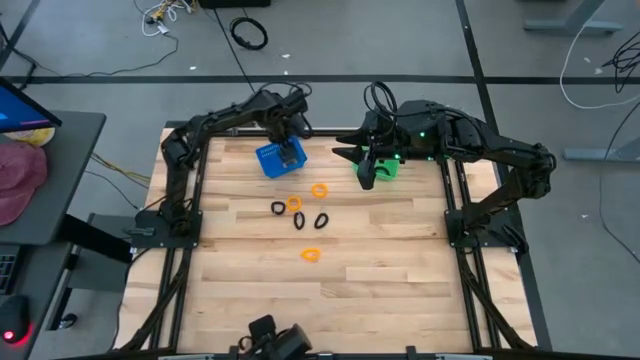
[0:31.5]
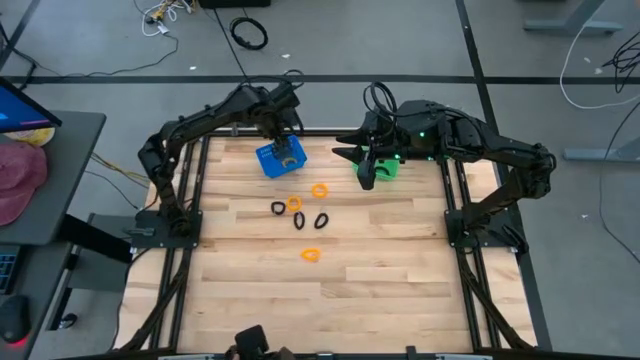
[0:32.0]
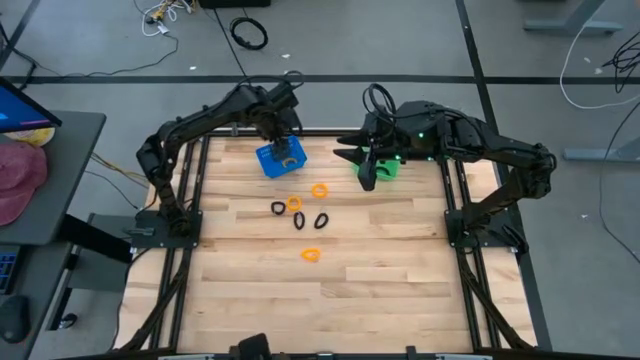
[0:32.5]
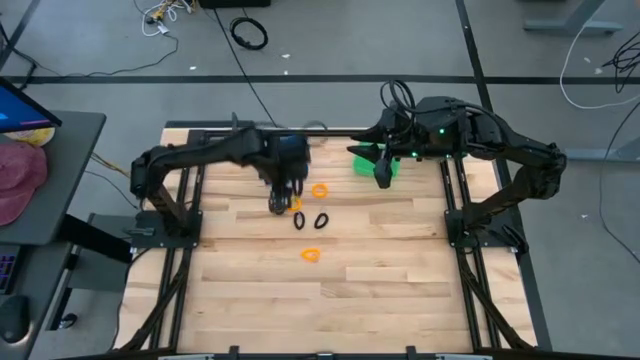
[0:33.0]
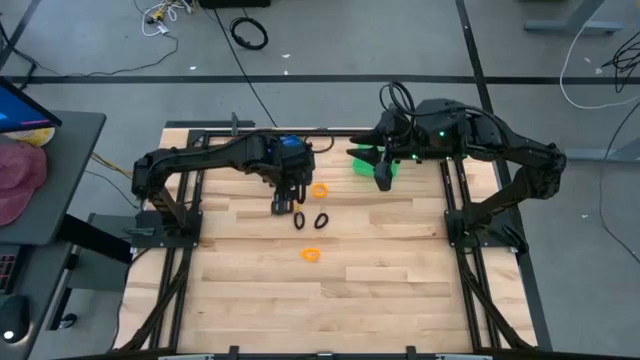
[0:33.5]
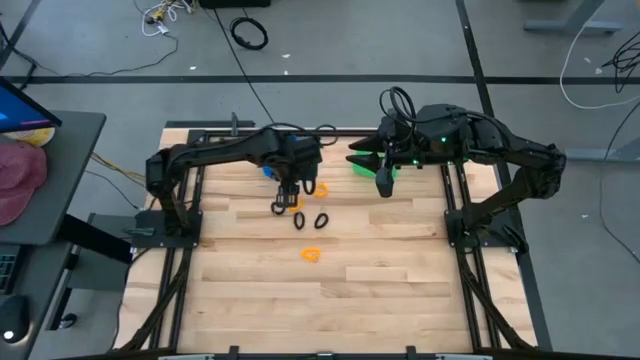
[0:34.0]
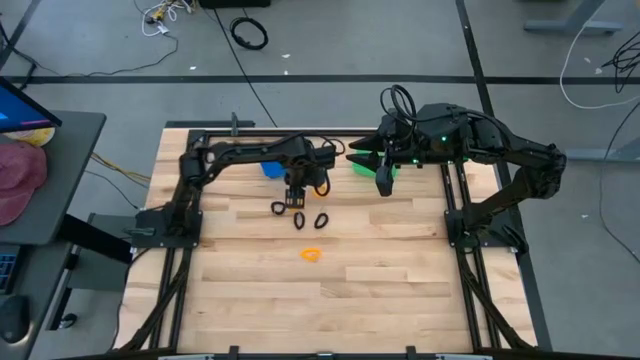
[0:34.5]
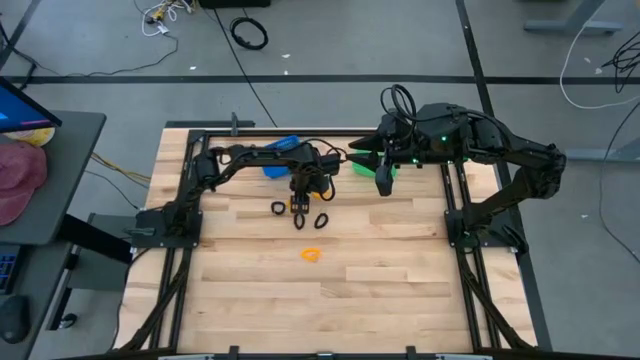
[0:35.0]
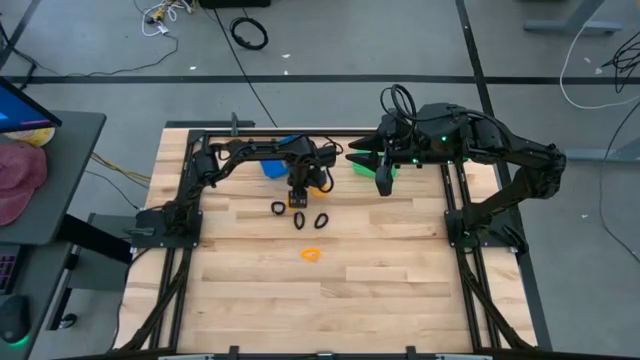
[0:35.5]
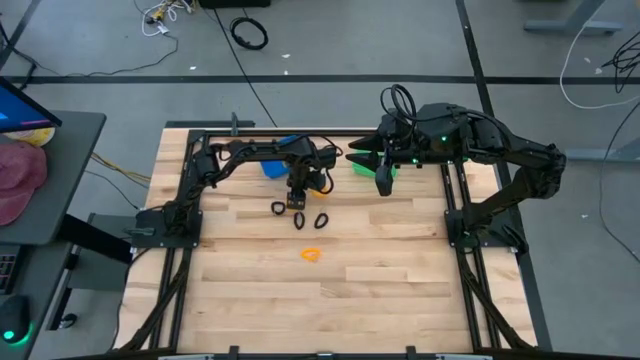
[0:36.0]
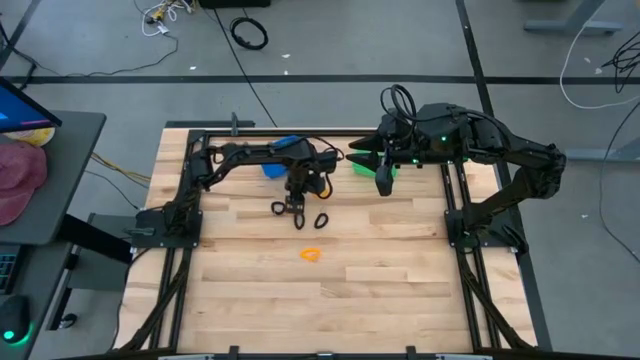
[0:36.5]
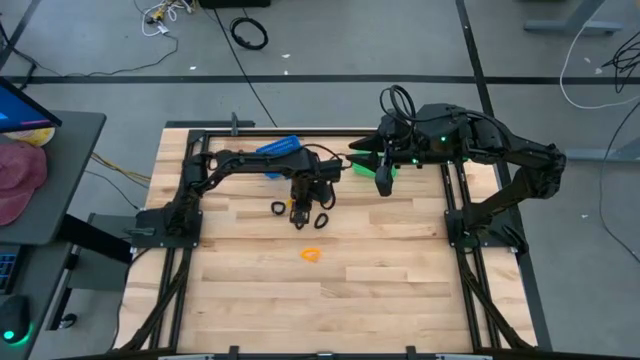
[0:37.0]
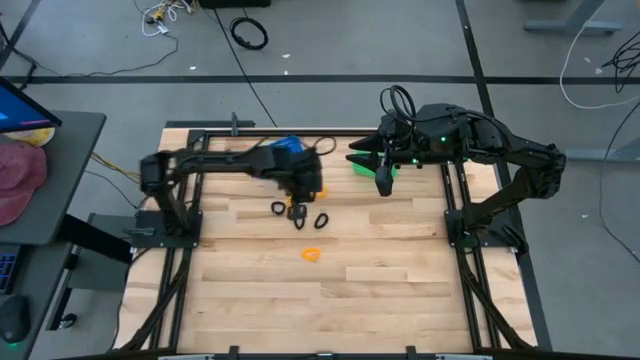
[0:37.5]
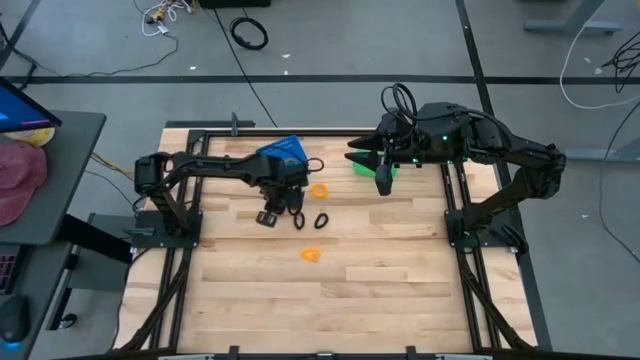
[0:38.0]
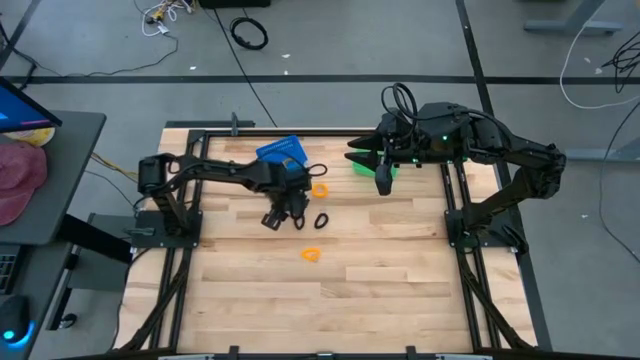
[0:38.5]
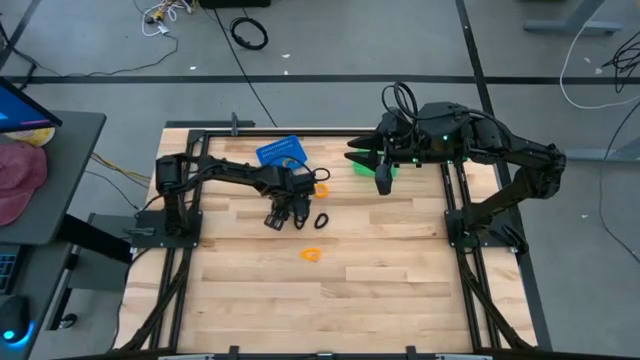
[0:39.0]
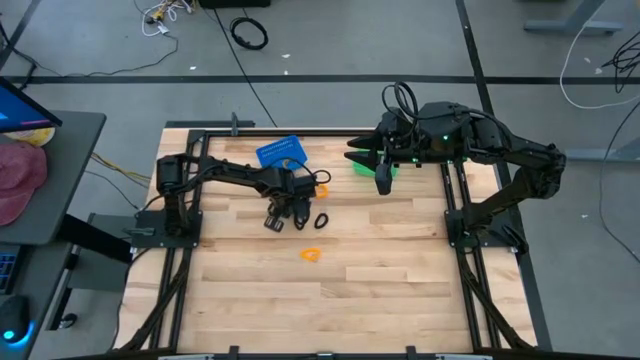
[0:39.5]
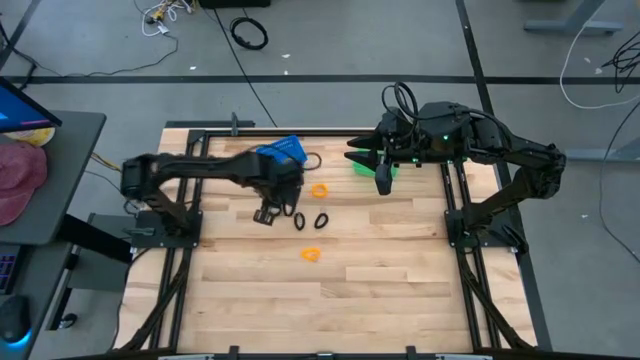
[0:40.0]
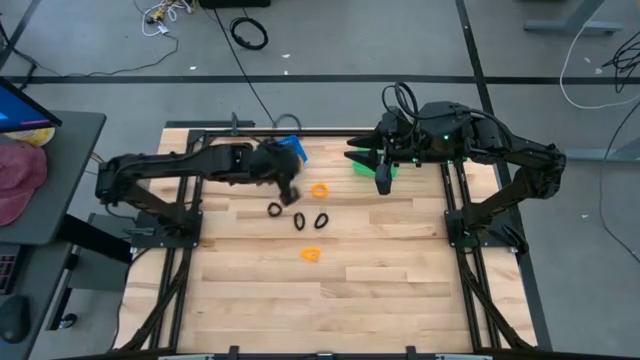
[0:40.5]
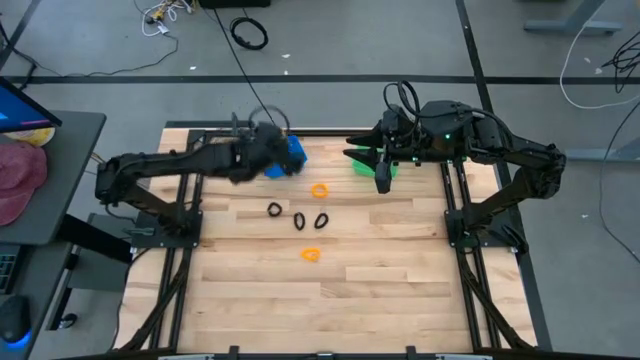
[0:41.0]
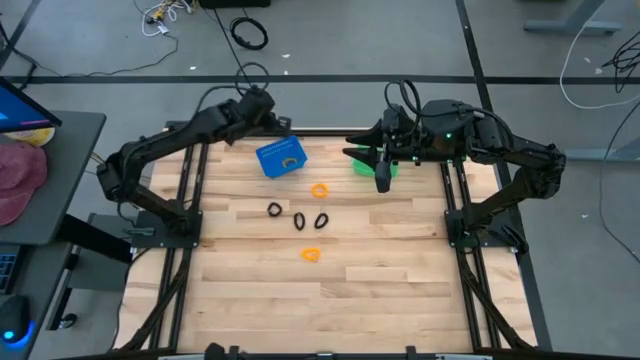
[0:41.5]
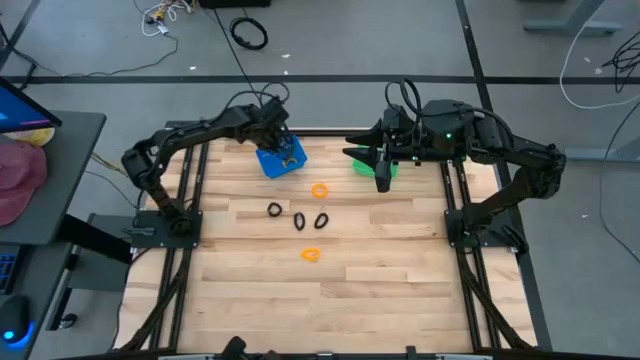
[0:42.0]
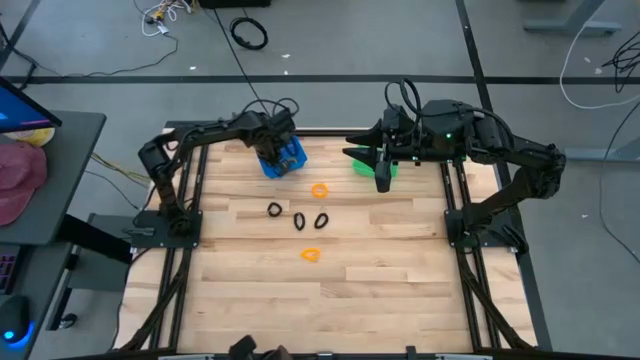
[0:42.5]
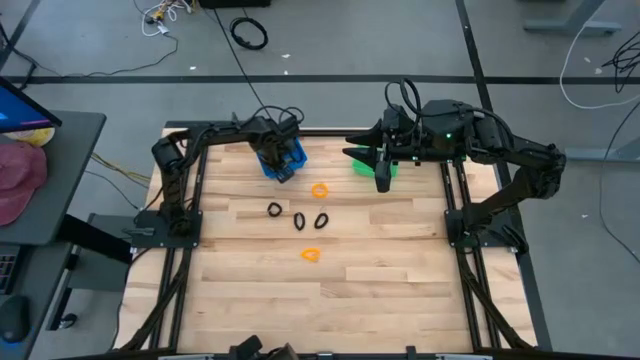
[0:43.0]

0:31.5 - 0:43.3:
Task: Sort spring keychains
Put the yellow spring keychain into the blue bin

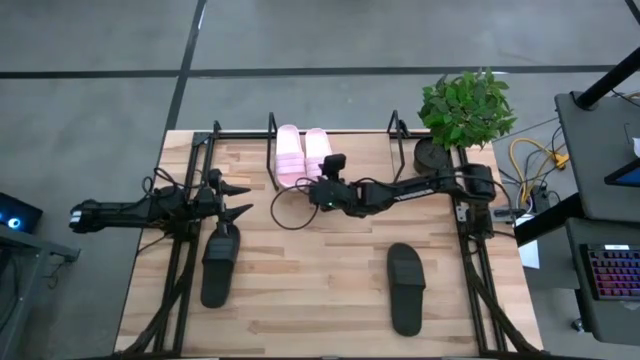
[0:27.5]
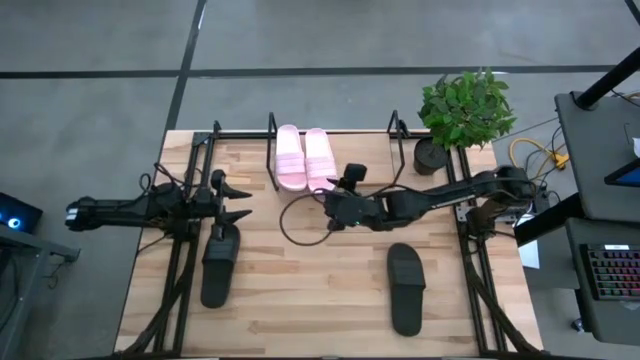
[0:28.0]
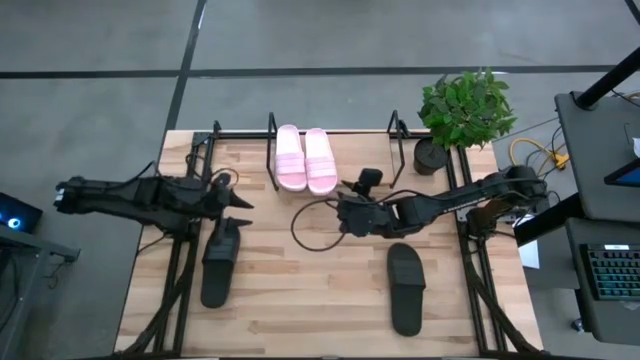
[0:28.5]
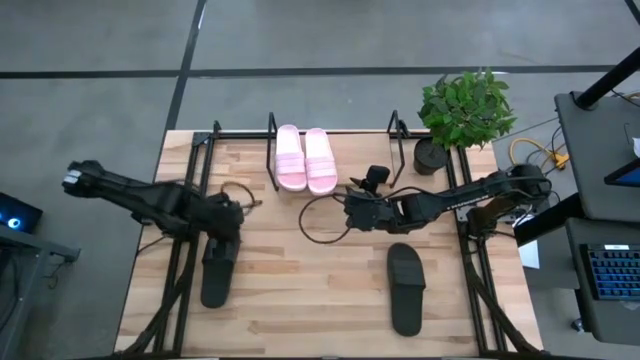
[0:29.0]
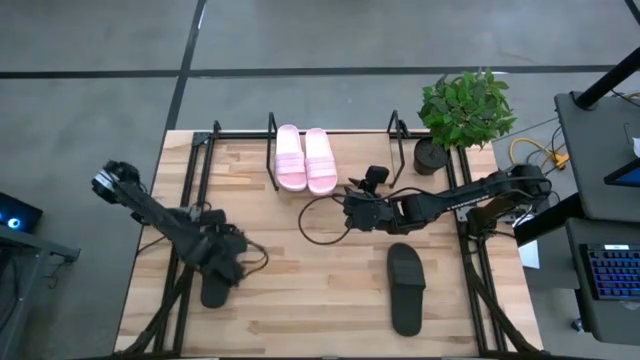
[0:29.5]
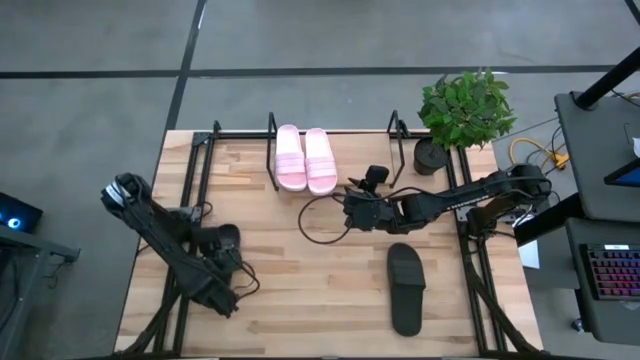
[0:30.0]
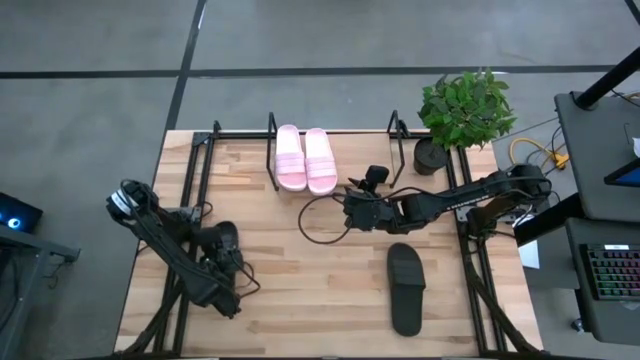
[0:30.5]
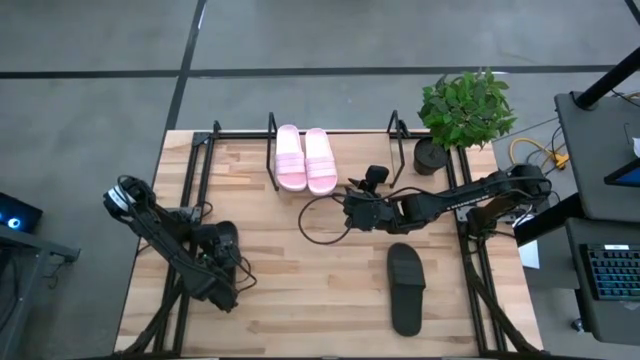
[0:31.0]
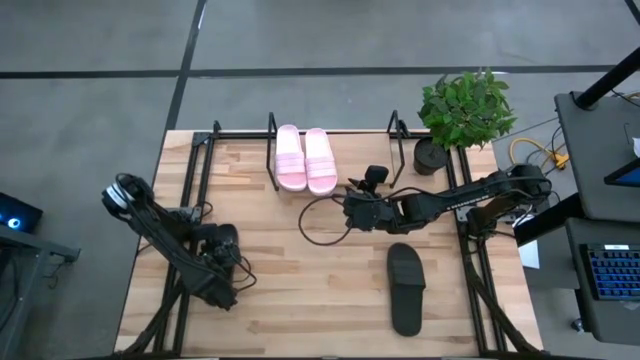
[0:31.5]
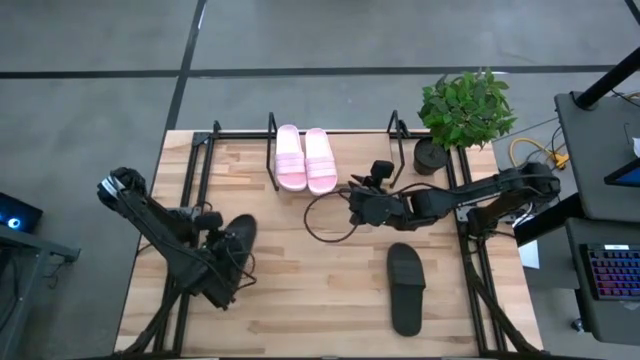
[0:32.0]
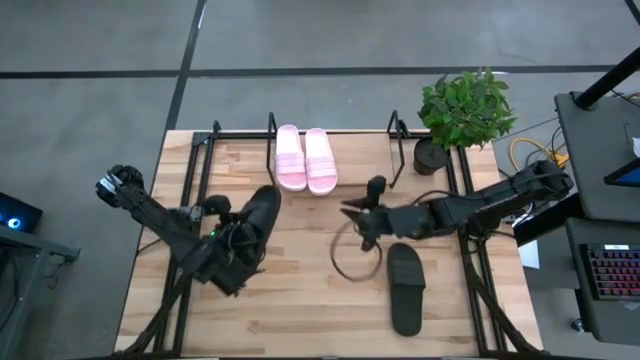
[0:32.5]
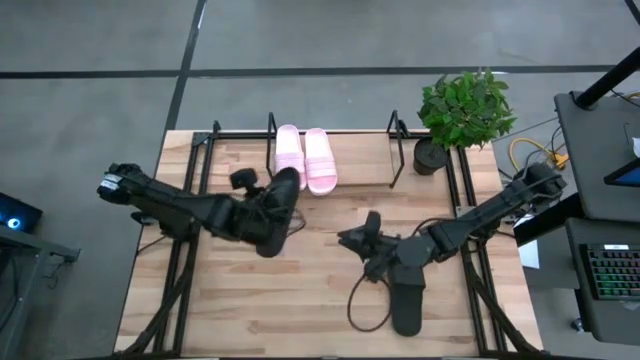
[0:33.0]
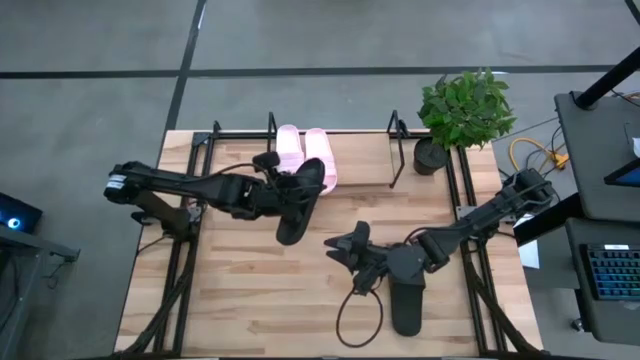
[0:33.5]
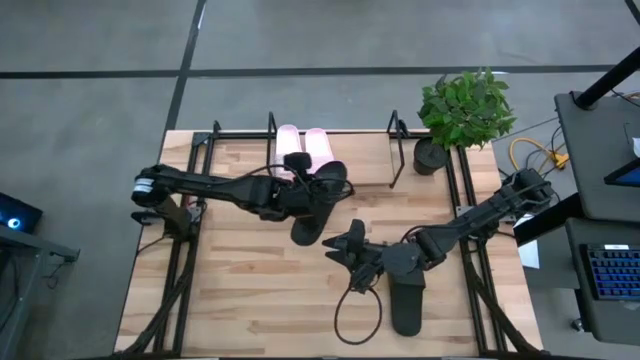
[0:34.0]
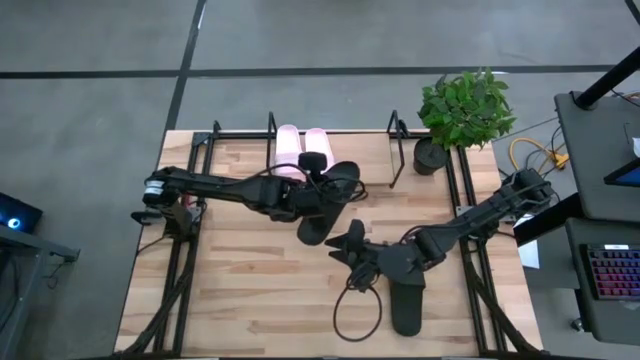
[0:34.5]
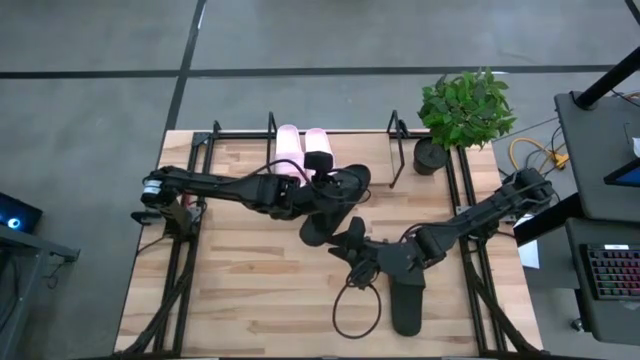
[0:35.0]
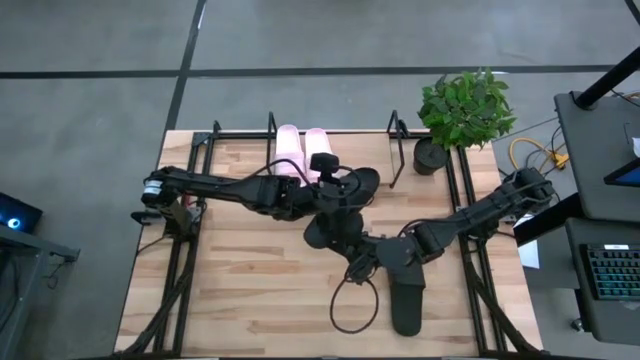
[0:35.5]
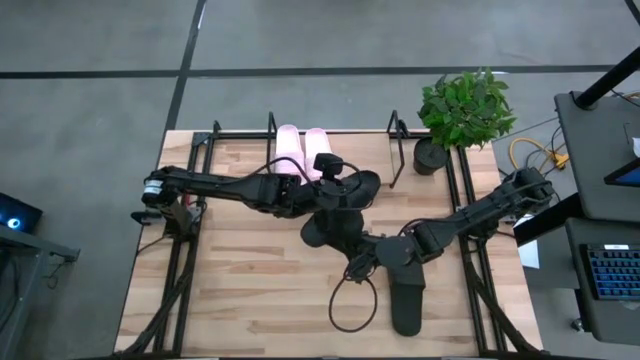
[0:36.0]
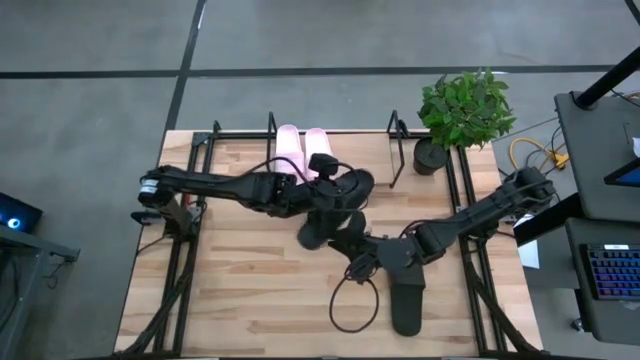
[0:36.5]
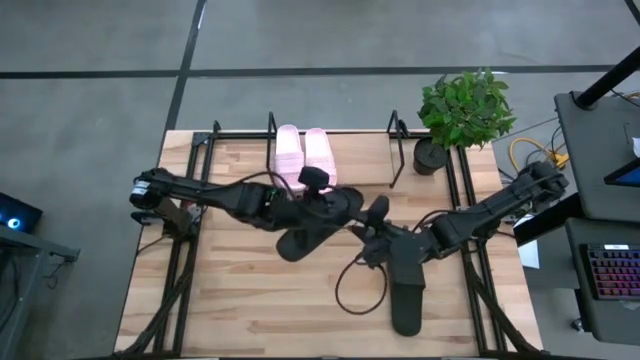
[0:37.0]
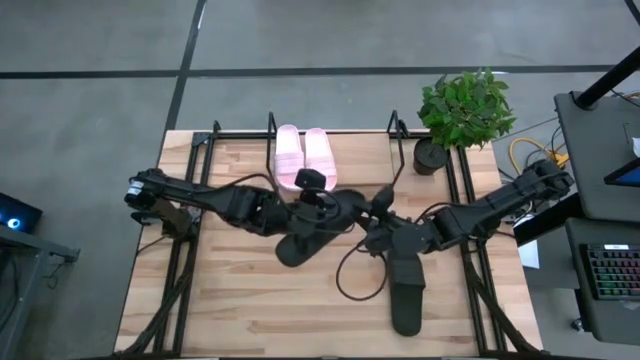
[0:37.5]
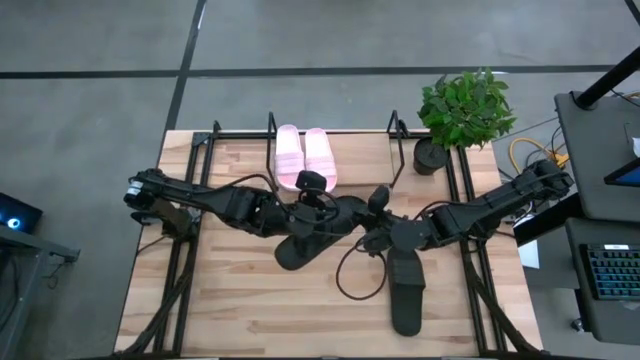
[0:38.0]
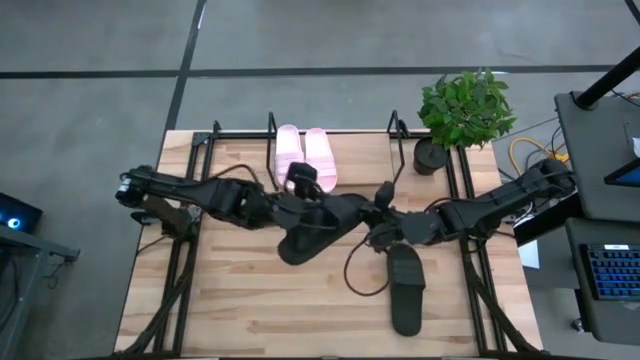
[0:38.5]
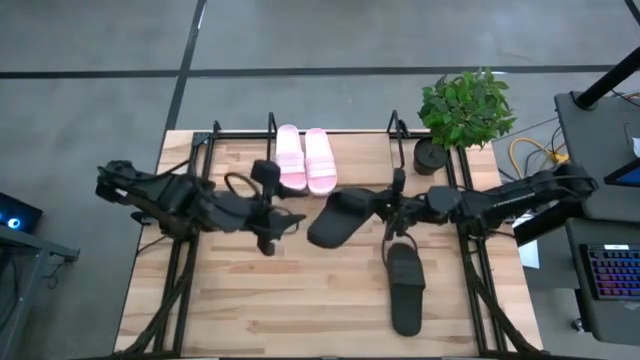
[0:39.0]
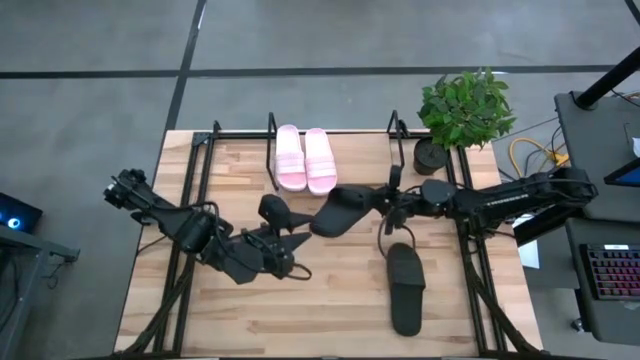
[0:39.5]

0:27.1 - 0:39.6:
Task: Pick and place slides into the shelf
Put the left black slides on the shelf
